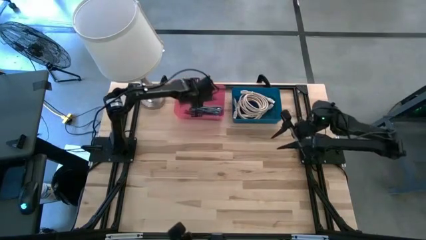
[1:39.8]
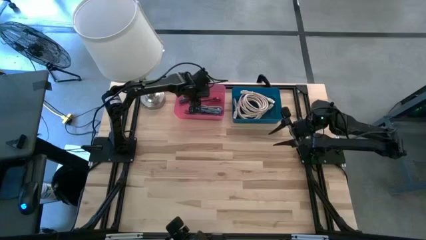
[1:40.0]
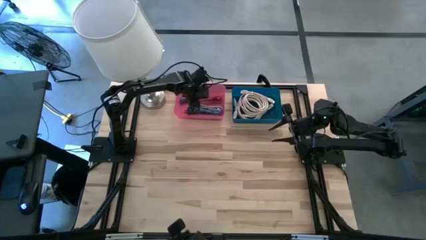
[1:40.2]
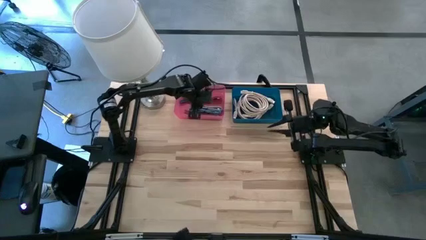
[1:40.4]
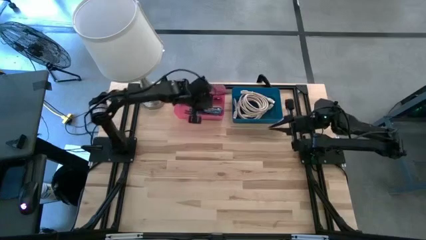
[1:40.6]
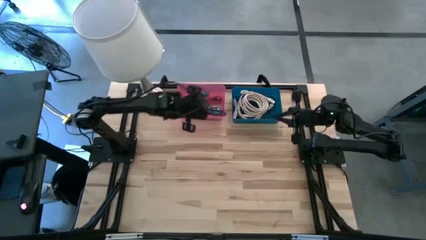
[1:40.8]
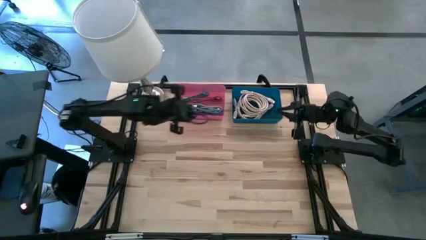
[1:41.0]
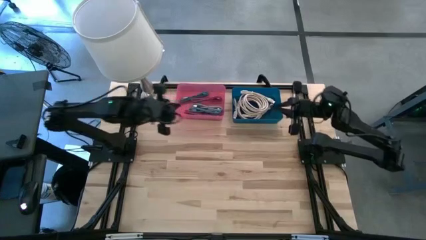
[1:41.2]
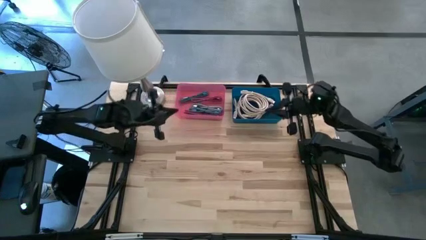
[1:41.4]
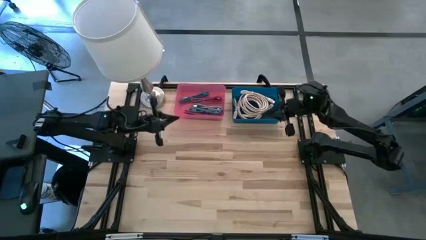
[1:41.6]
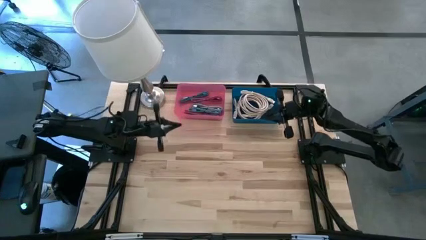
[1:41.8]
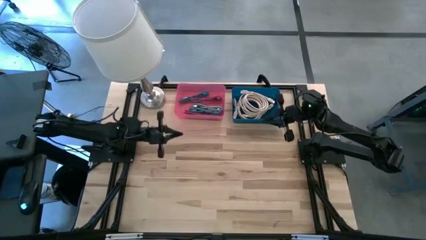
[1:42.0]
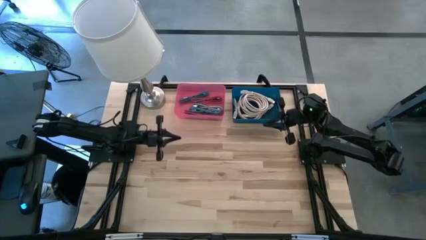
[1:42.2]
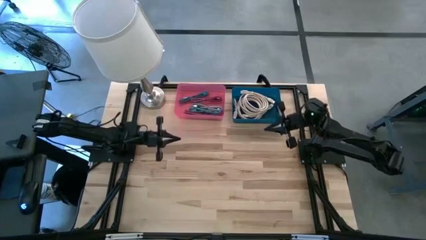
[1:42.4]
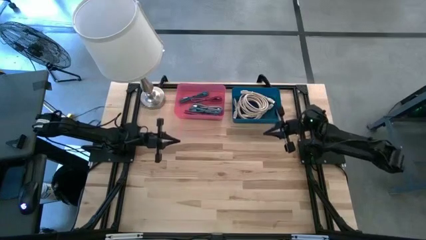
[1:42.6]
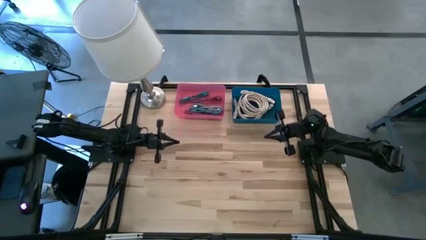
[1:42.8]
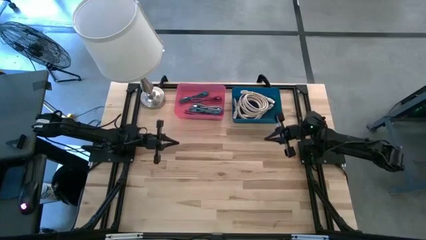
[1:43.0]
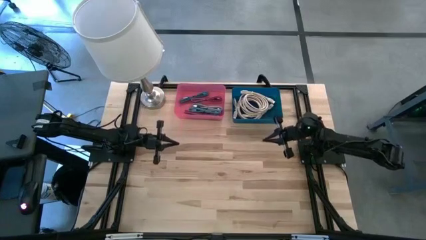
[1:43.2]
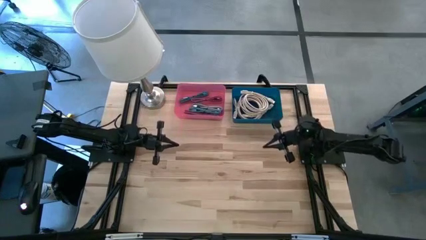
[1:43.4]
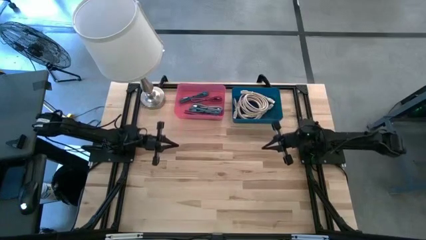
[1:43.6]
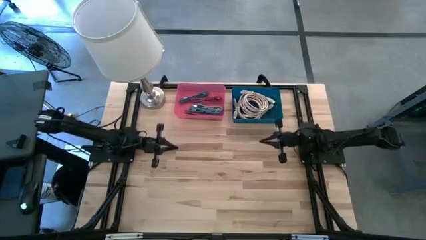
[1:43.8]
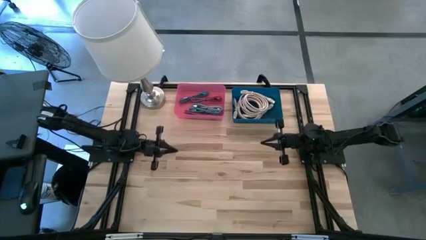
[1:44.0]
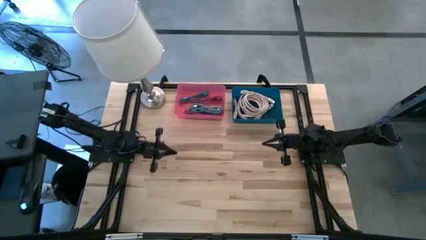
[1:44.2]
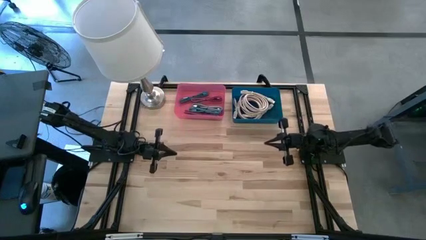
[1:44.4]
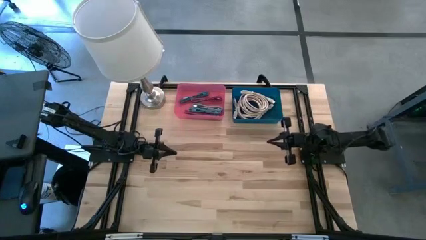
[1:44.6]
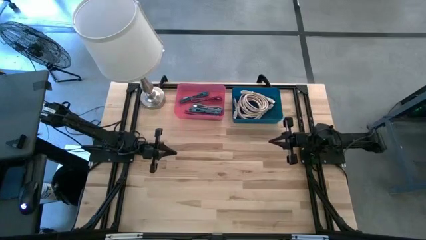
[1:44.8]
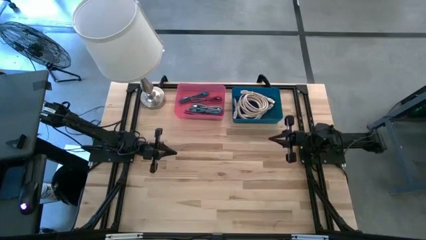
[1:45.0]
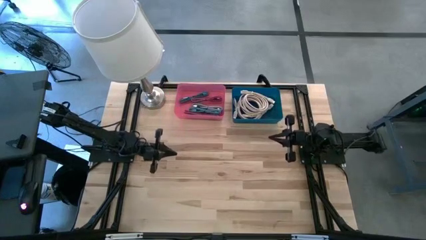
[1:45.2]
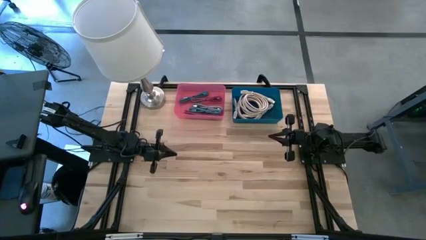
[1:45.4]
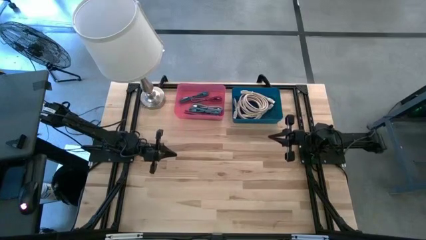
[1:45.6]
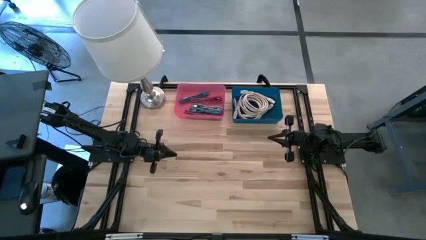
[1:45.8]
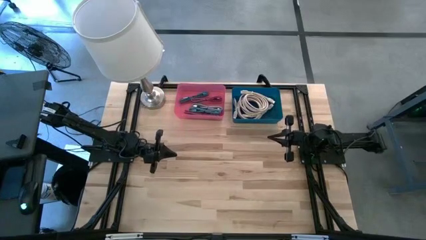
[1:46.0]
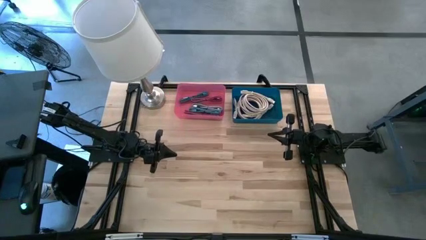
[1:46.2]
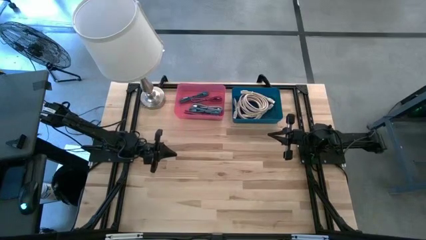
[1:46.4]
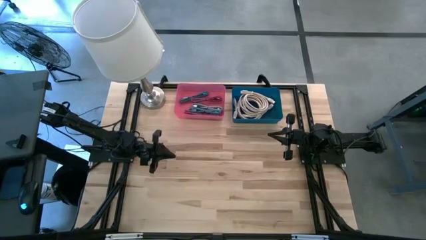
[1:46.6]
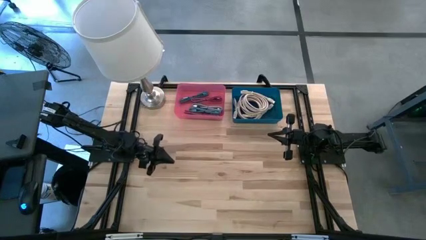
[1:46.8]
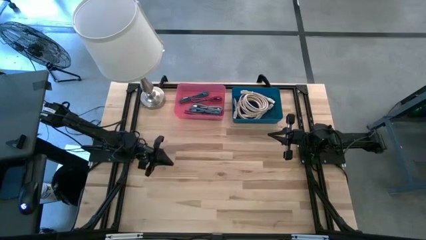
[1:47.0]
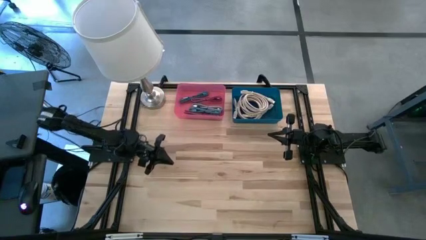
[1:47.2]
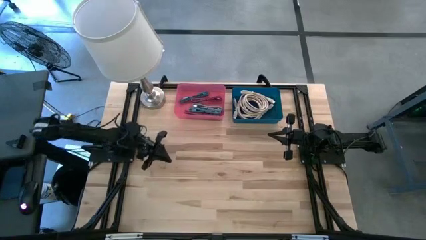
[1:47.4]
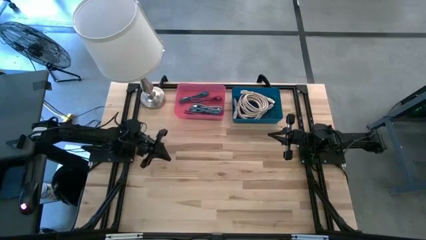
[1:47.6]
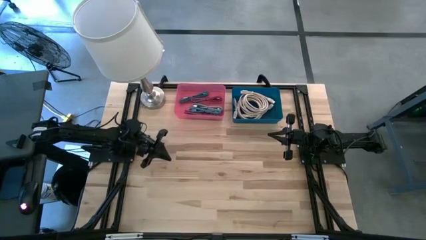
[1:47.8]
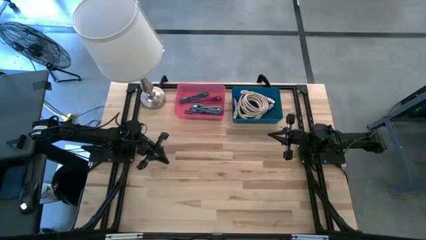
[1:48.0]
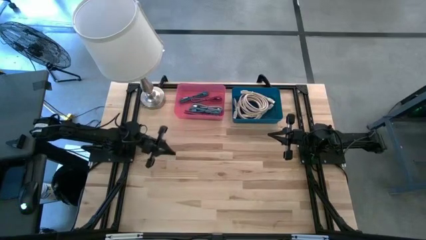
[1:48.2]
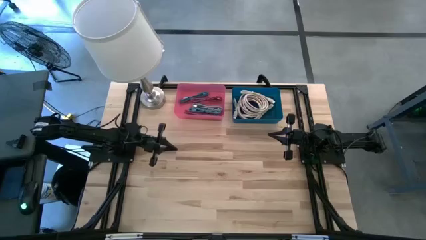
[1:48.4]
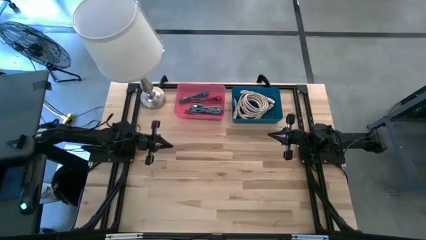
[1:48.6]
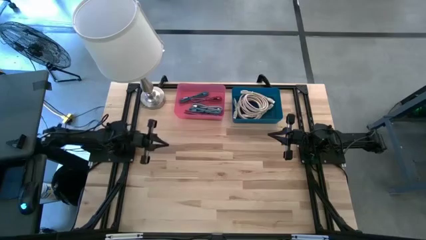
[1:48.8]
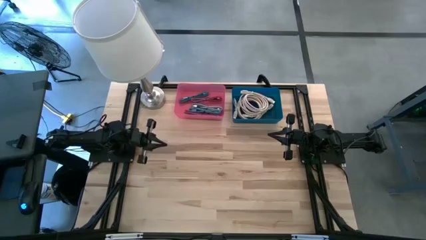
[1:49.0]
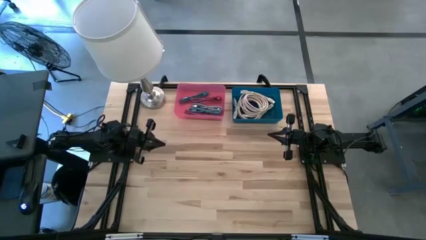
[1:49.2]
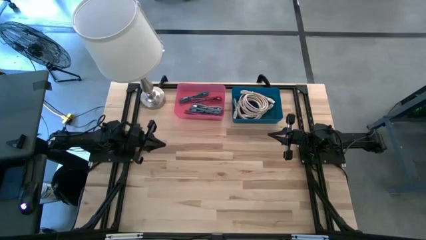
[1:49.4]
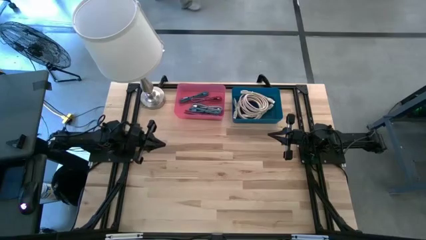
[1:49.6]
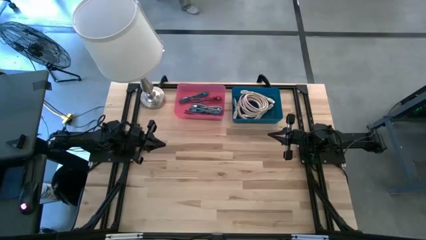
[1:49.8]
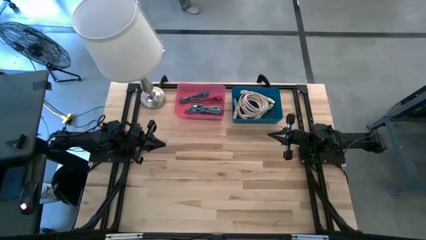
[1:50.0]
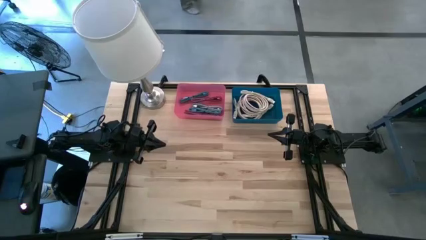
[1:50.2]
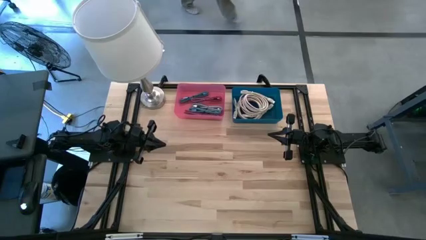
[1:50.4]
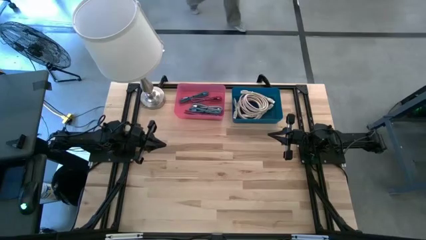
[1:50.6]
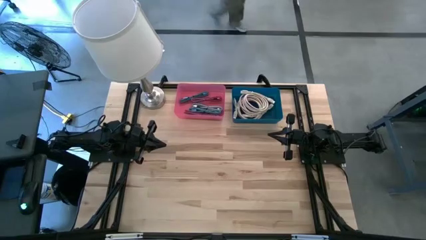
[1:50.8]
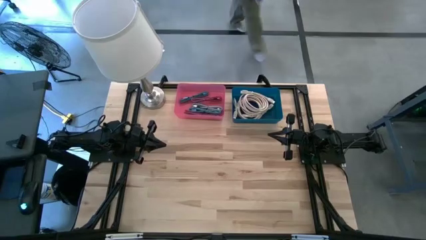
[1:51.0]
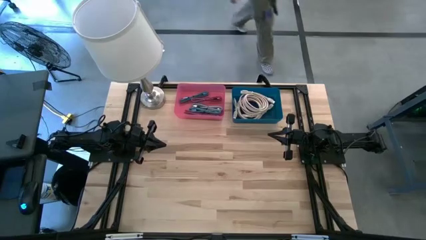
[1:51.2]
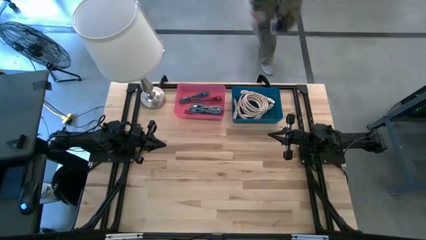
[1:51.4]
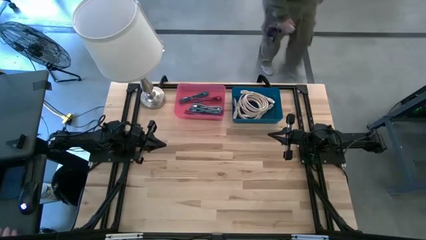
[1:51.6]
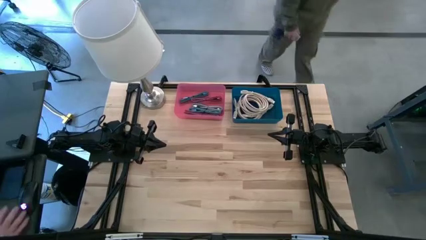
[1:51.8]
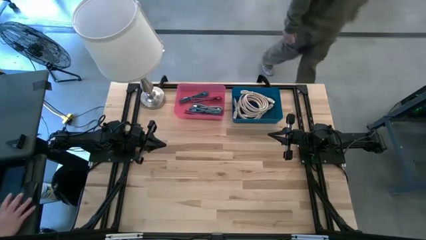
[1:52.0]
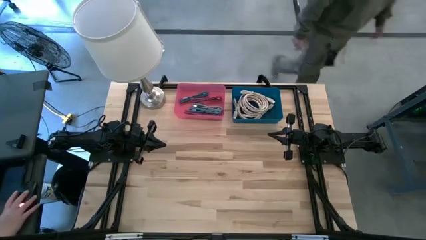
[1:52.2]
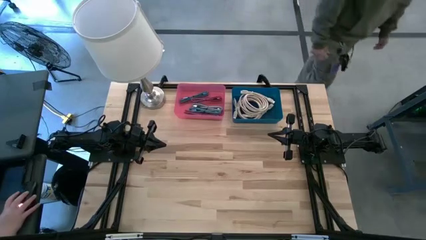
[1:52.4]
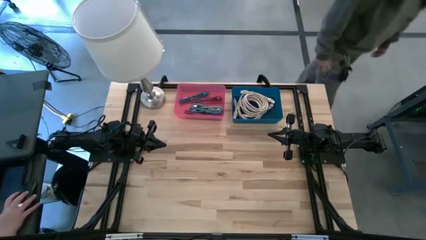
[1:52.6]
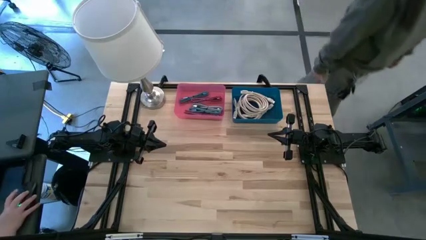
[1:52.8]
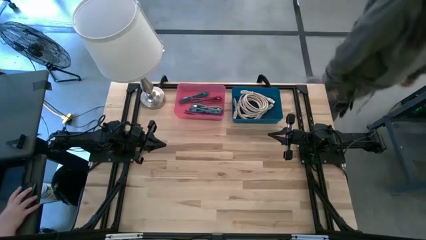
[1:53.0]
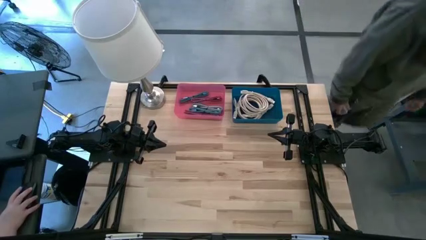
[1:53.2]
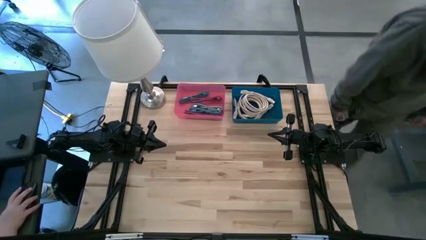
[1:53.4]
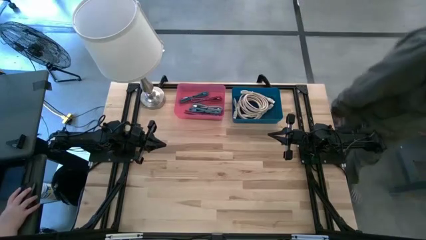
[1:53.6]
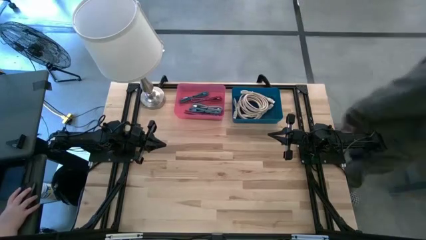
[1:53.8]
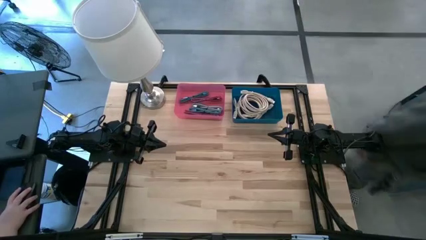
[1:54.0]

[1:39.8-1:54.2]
Task: Pick & Place USB Port
Return to Home Position
